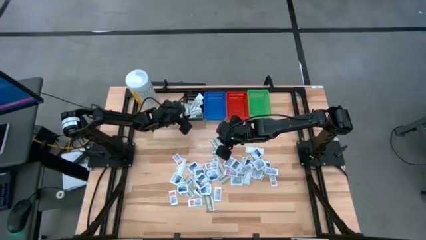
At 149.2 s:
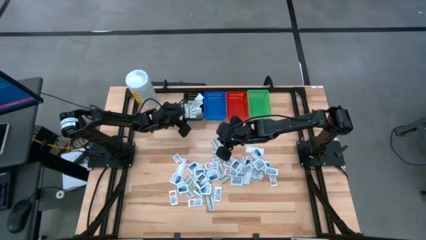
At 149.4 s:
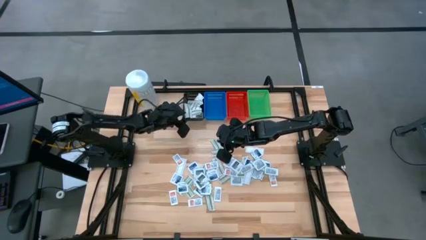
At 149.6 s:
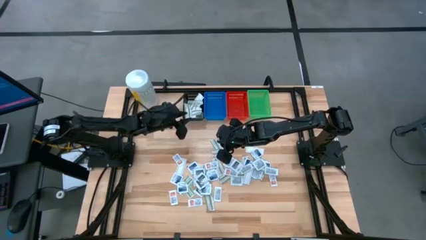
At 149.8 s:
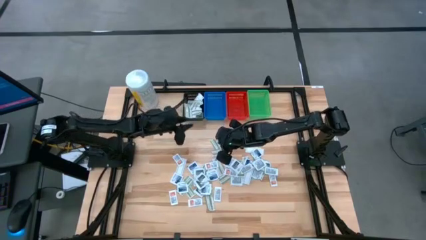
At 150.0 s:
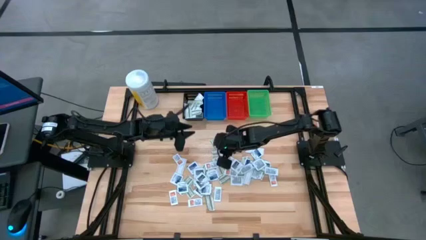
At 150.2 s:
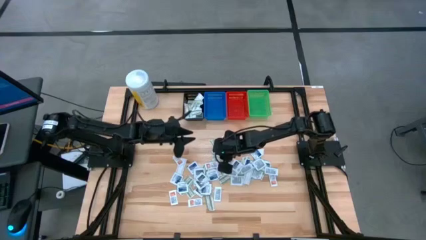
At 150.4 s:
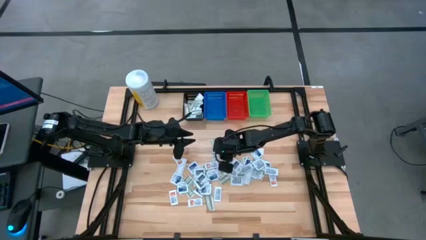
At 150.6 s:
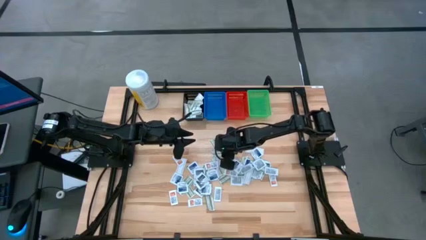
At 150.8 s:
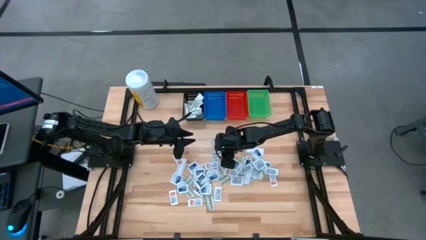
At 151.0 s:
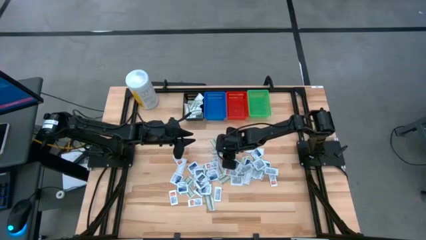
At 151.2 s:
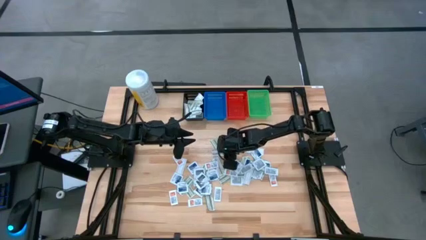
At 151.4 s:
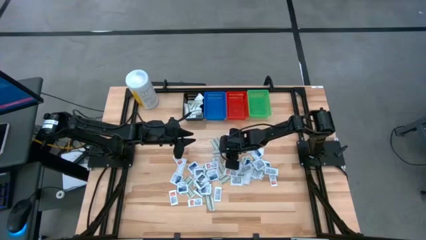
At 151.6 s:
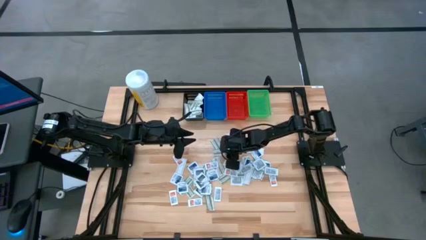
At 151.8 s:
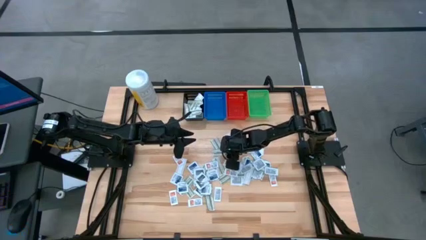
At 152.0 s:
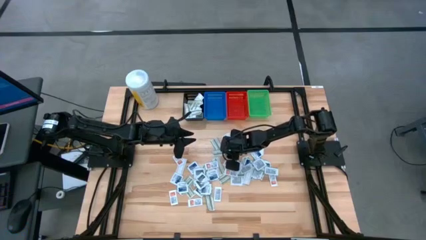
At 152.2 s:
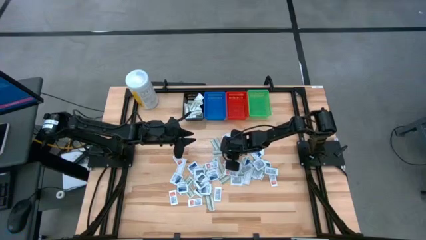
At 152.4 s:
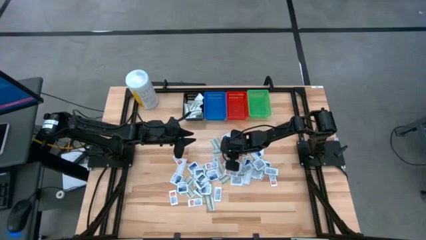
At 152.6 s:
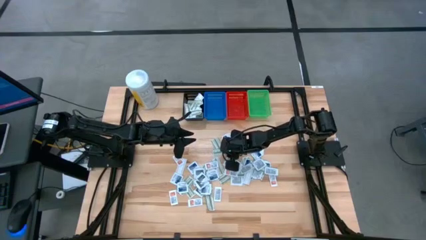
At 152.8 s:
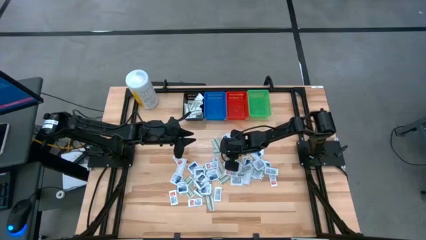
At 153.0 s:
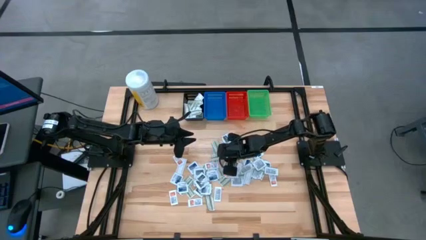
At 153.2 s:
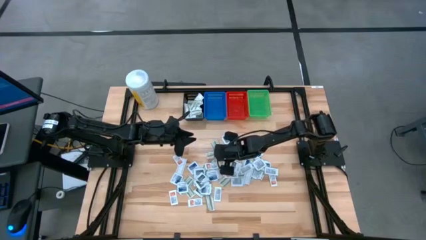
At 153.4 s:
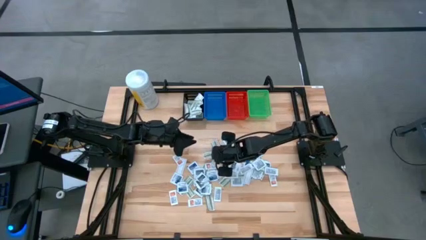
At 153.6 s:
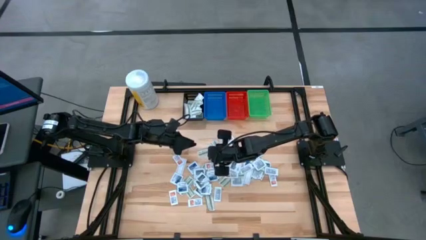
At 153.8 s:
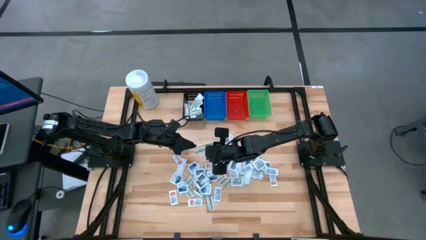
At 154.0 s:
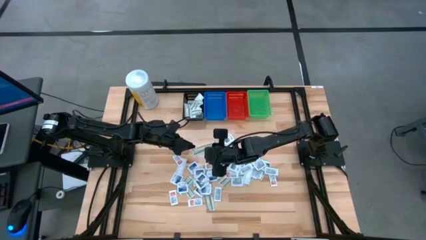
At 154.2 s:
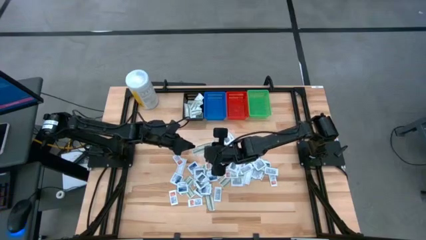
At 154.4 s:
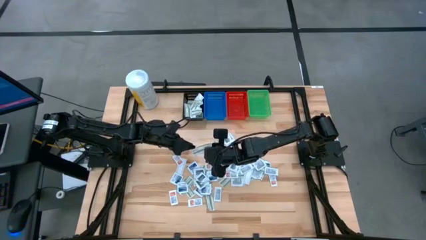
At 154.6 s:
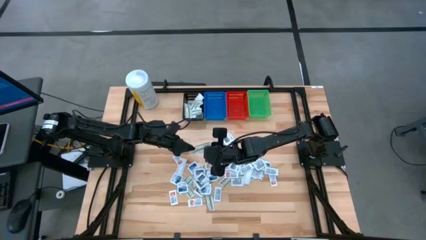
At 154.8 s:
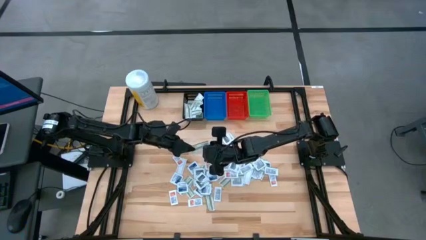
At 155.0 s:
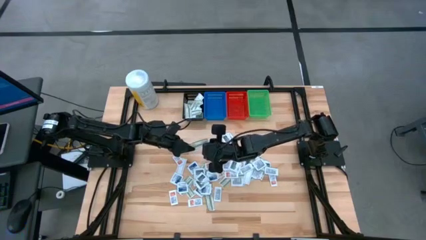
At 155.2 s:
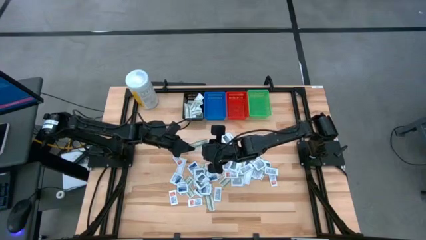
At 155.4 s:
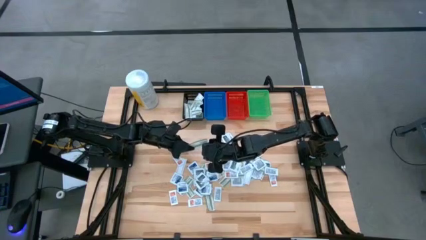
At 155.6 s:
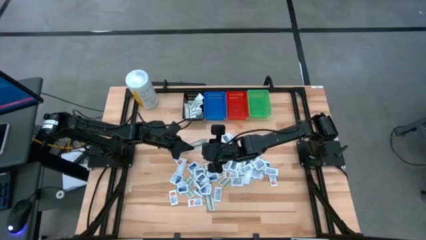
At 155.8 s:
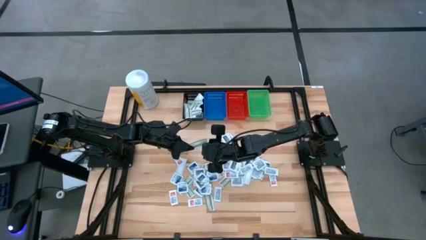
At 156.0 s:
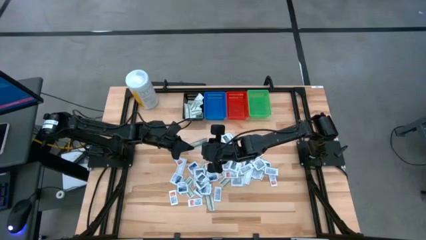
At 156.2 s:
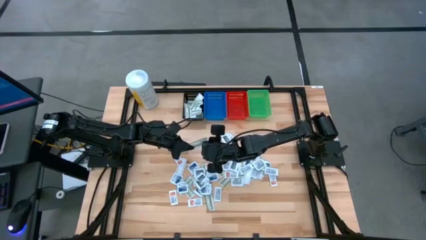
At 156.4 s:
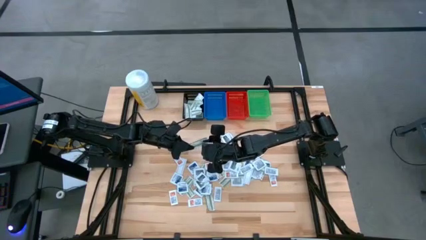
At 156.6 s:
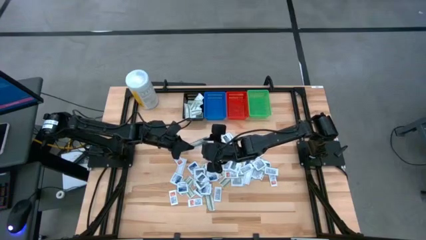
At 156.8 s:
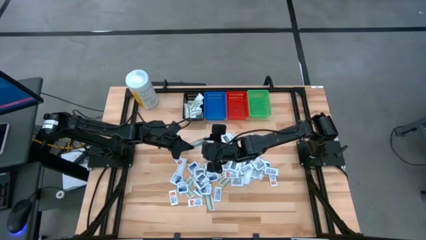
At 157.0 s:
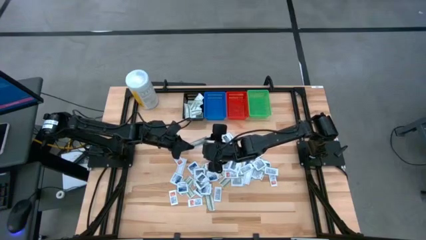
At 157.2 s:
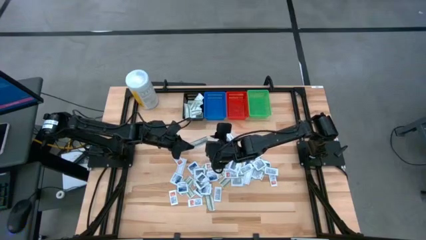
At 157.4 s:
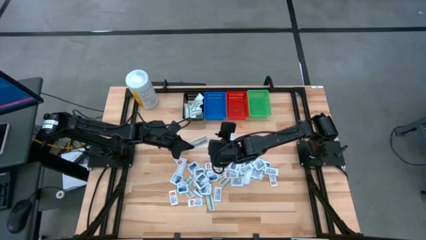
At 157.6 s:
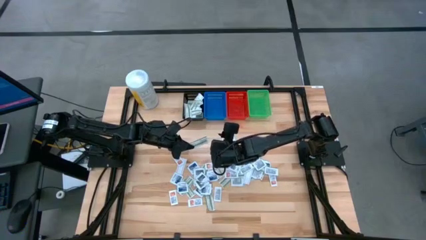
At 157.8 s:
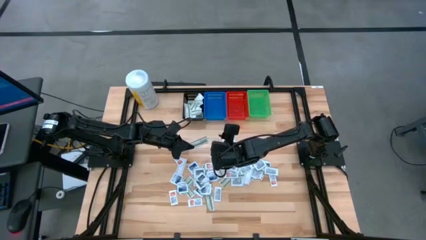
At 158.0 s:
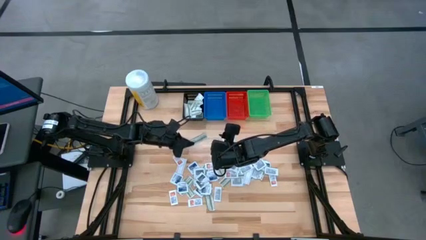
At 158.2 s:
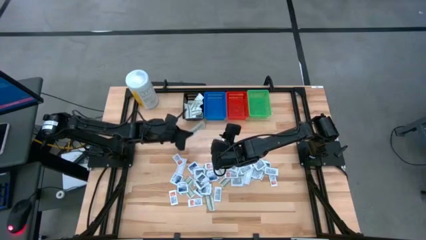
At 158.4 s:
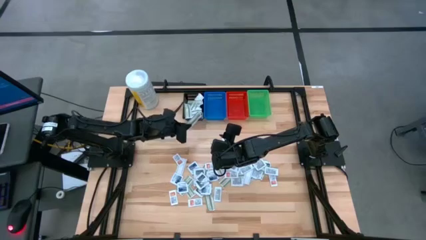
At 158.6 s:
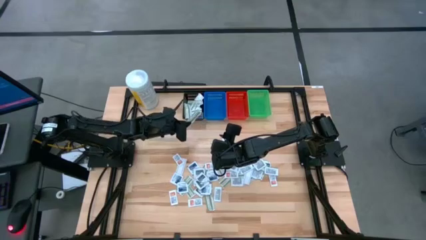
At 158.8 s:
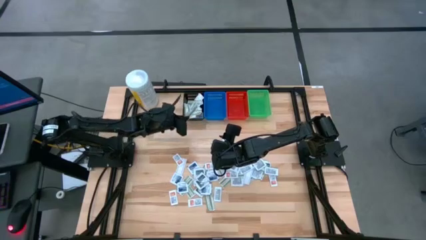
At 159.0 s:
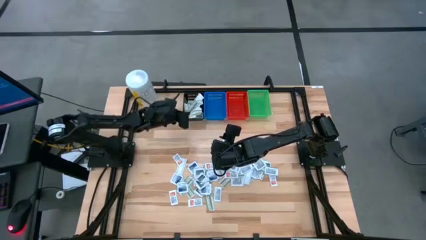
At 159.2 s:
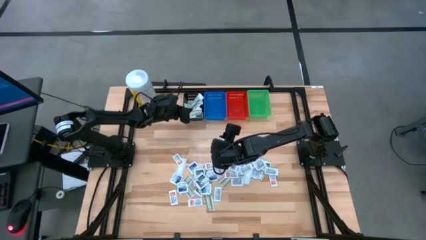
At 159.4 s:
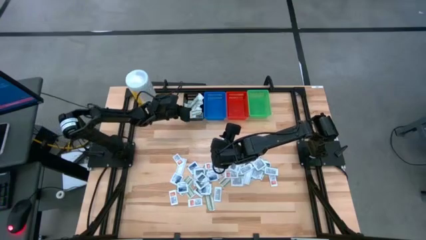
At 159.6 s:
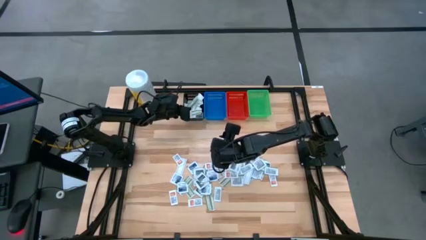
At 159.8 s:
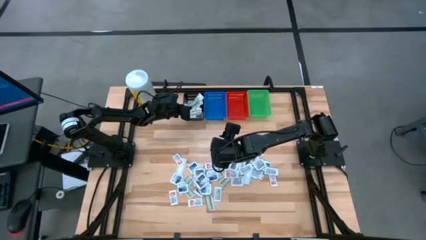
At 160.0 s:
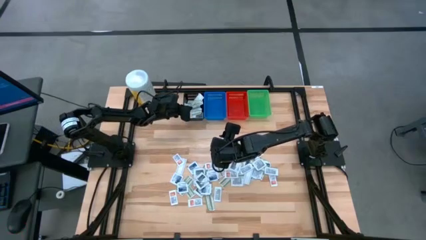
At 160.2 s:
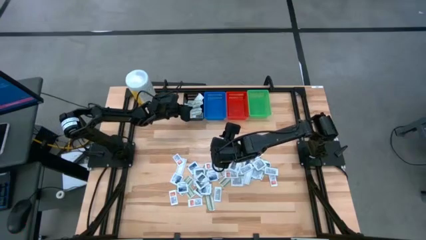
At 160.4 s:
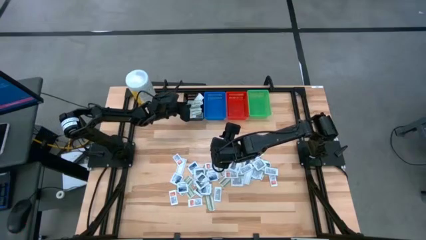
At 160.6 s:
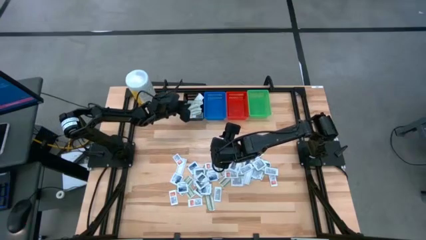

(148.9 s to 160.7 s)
Task: Pick & Place First Aid Supplies
Put the green bandage pack in the black bin

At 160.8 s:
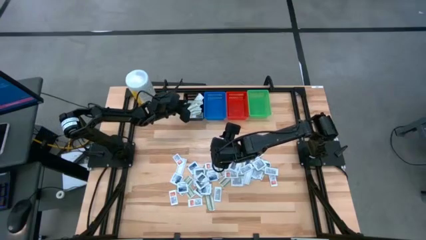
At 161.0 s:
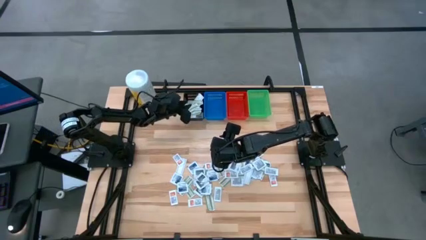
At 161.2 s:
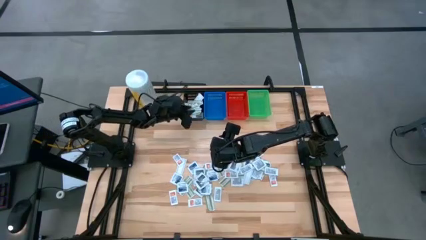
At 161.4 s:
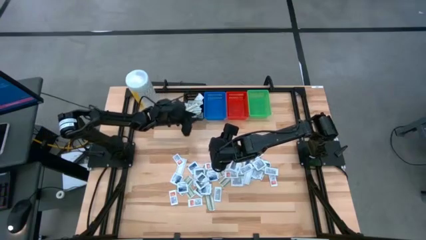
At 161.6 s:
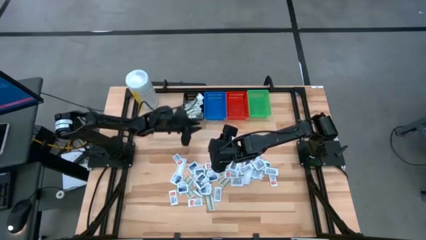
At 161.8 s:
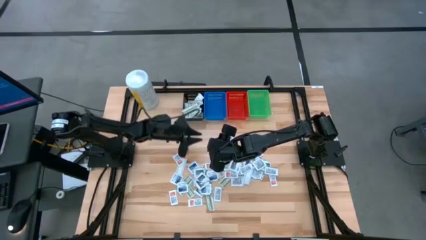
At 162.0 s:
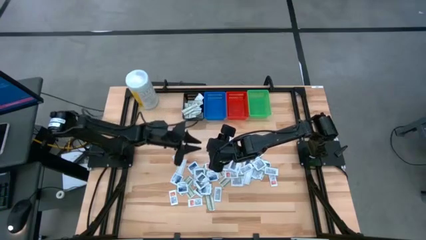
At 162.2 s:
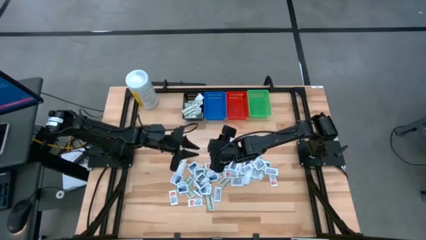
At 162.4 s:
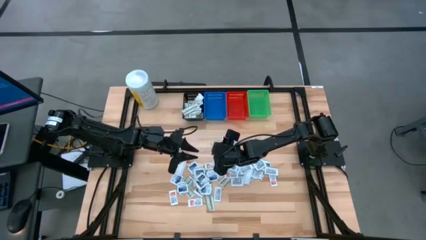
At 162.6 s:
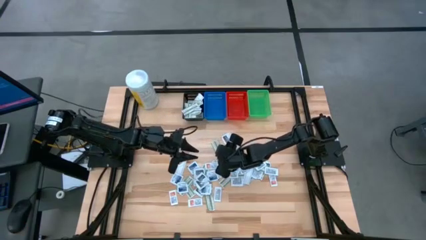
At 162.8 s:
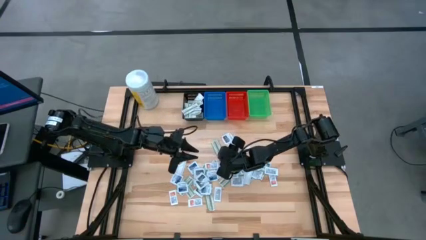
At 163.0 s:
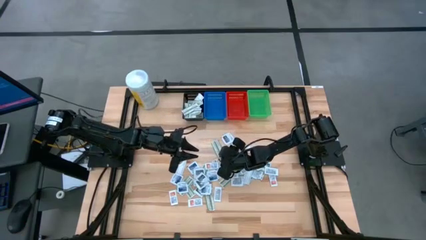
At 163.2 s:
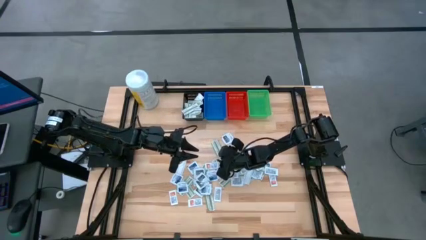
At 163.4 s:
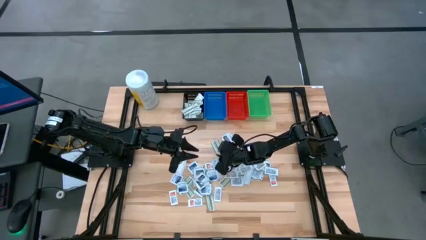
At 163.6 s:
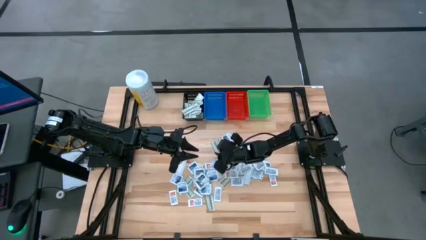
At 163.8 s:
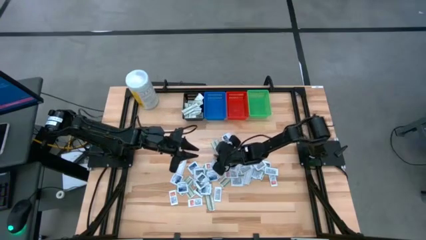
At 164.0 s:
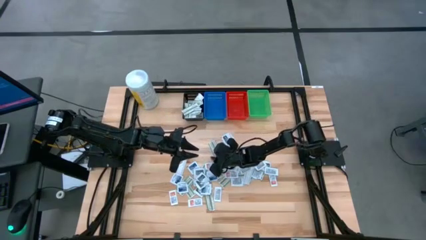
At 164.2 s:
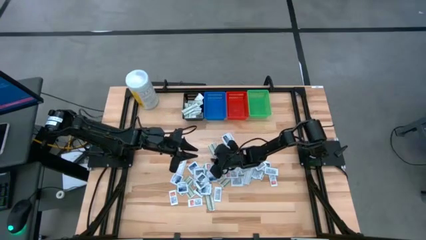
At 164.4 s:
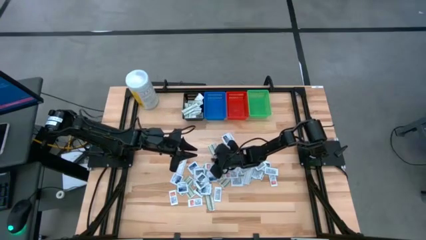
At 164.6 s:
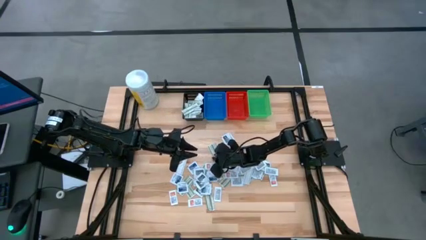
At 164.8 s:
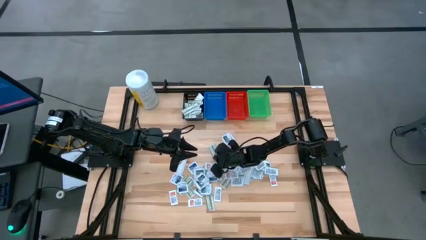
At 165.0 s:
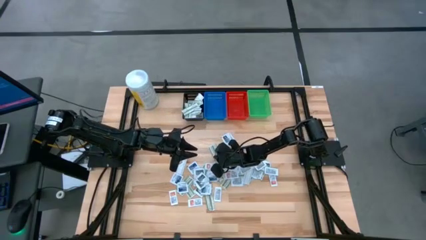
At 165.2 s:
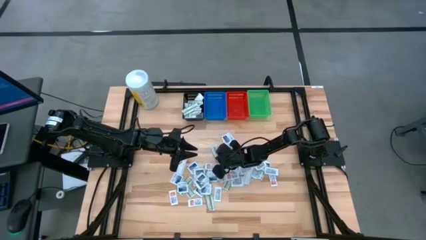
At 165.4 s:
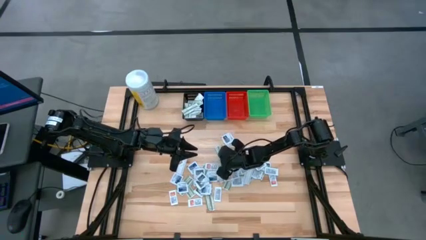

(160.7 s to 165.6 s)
Put the green bandage pack in the black bin
